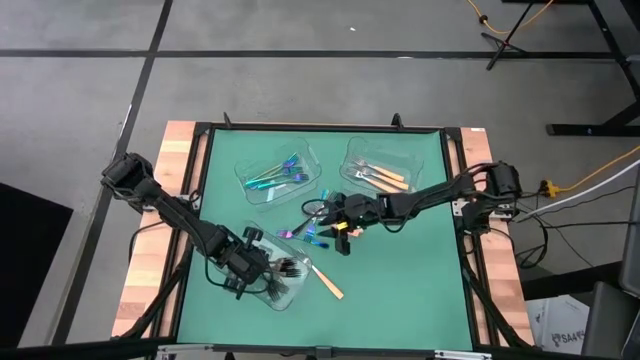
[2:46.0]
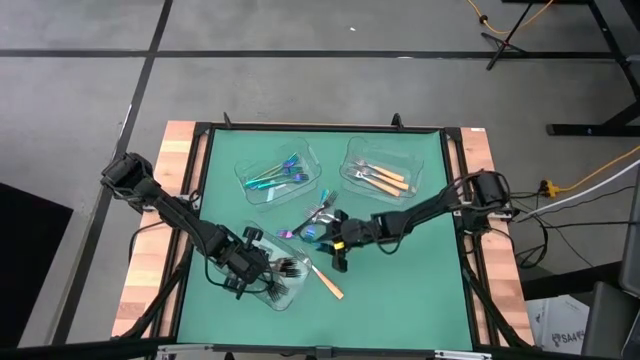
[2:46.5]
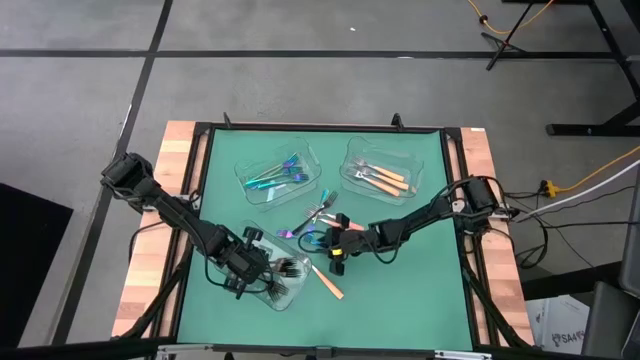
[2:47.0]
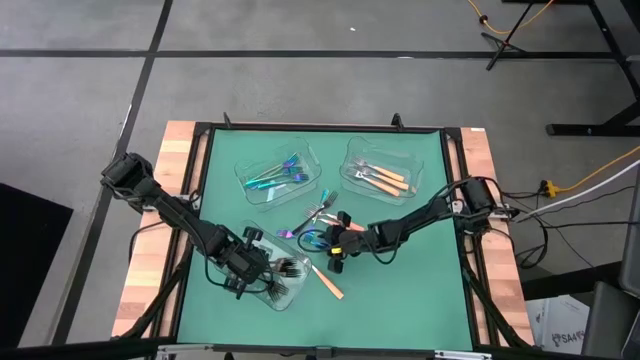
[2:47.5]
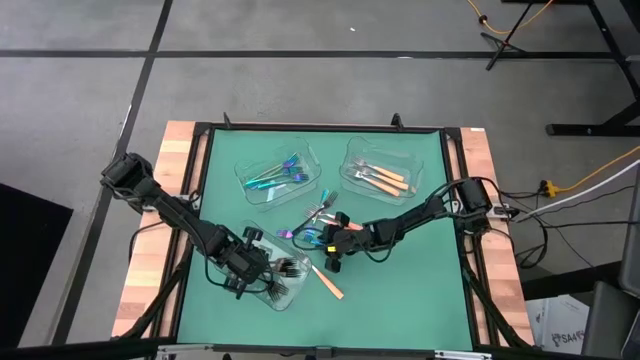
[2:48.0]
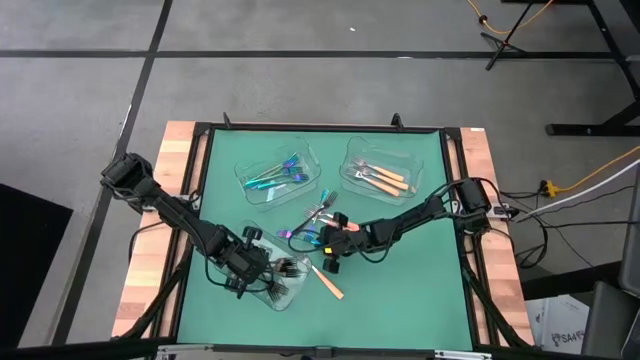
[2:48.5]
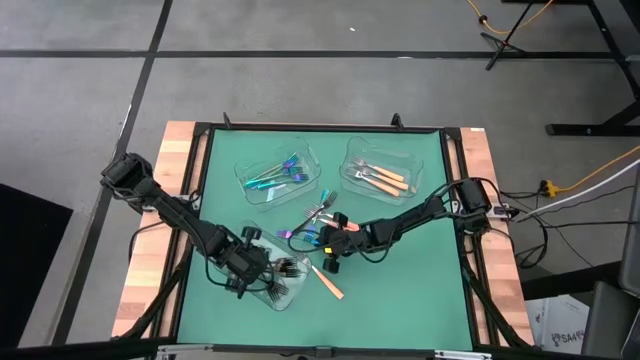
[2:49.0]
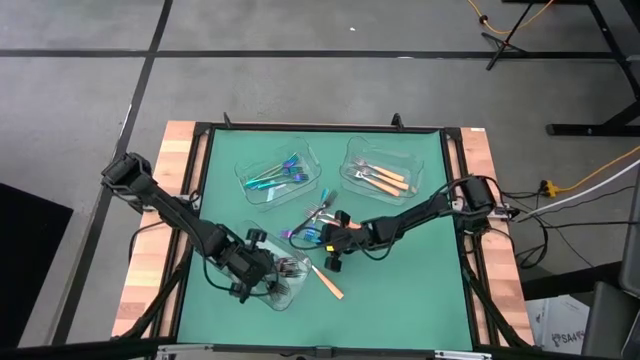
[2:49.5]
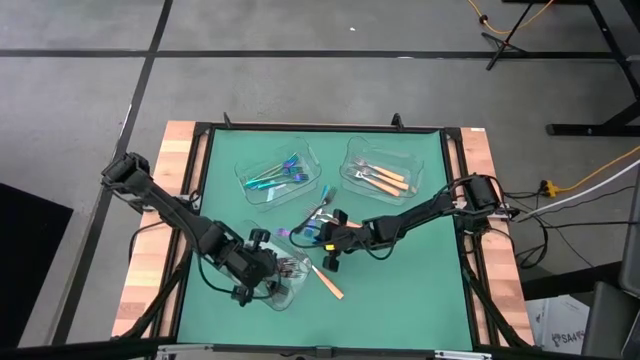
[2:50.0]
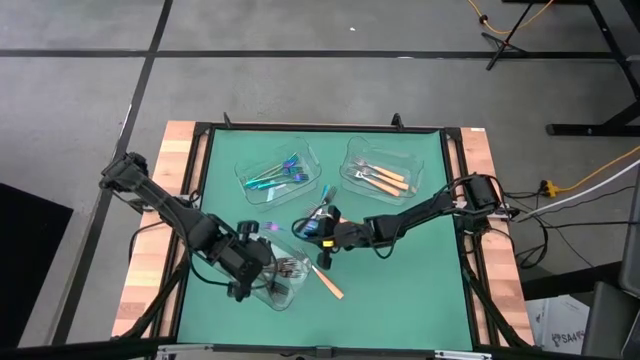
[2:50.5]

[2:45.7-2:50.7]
Task: Sort silverware by color (type)
Put the blue fork into the top left transparent bin

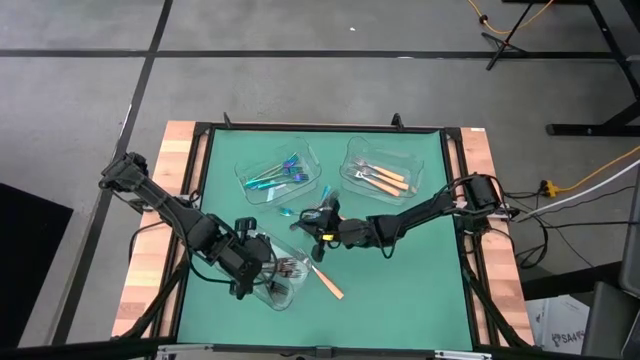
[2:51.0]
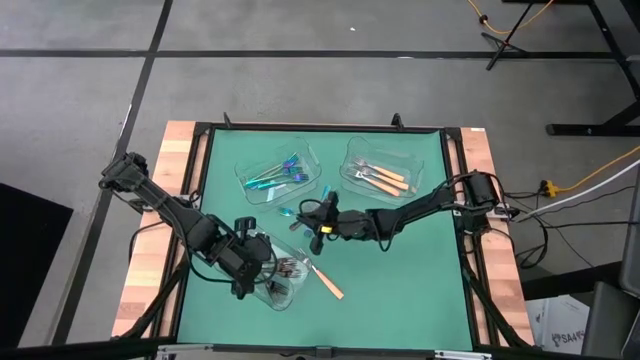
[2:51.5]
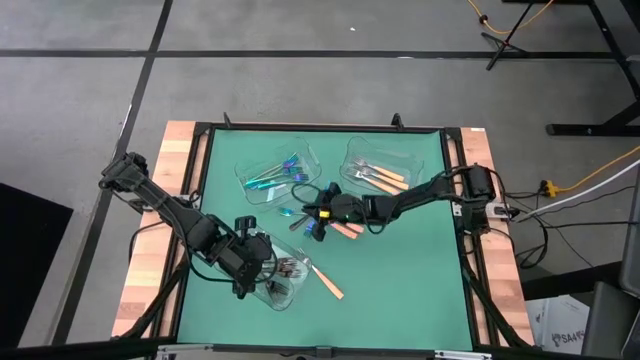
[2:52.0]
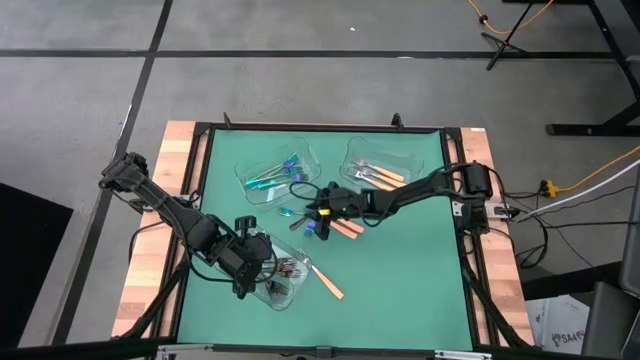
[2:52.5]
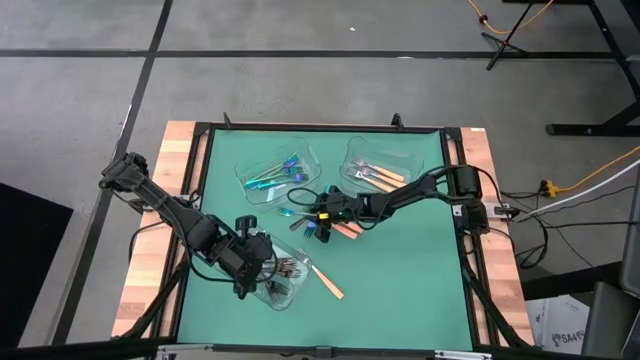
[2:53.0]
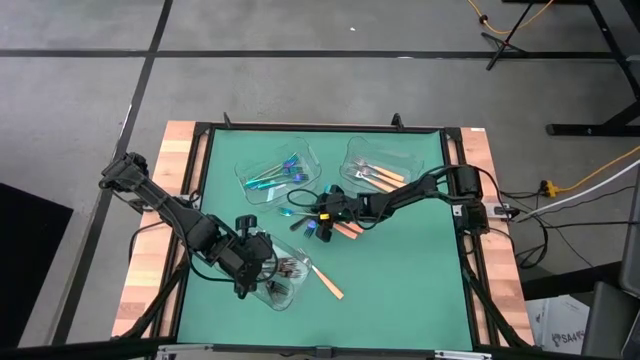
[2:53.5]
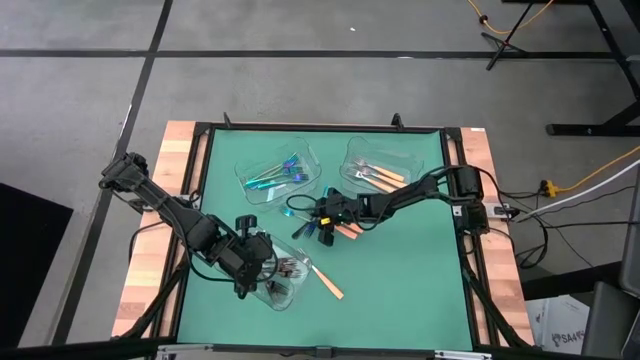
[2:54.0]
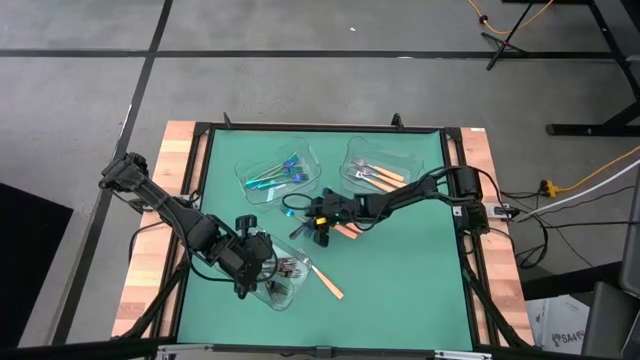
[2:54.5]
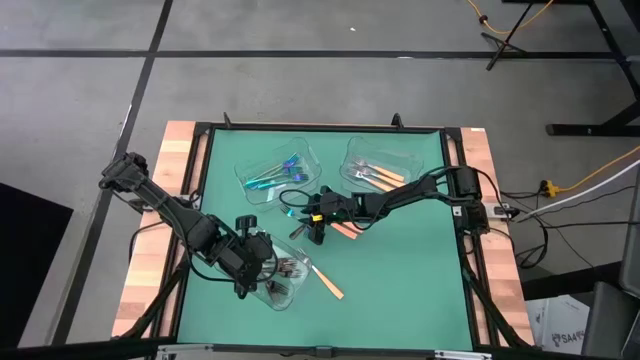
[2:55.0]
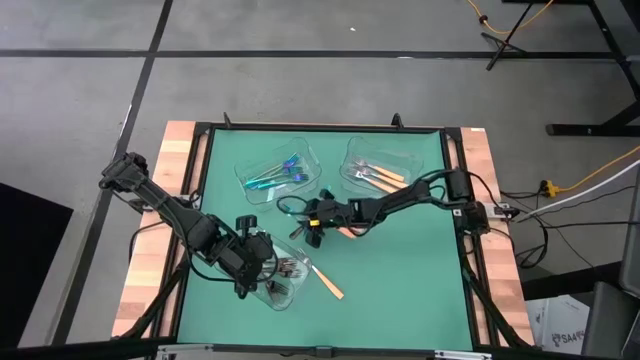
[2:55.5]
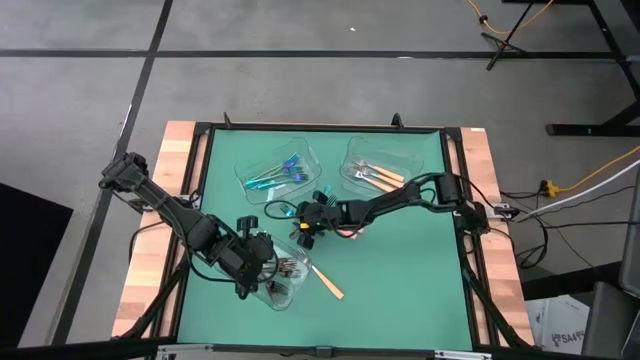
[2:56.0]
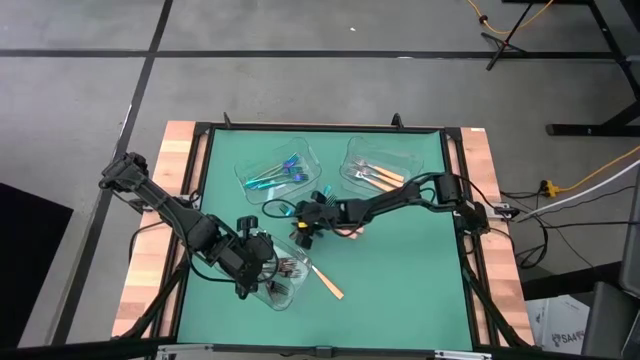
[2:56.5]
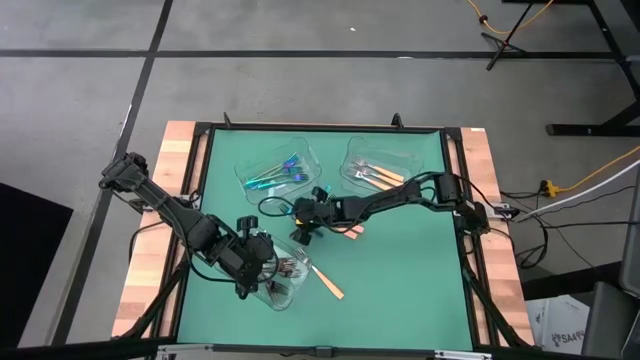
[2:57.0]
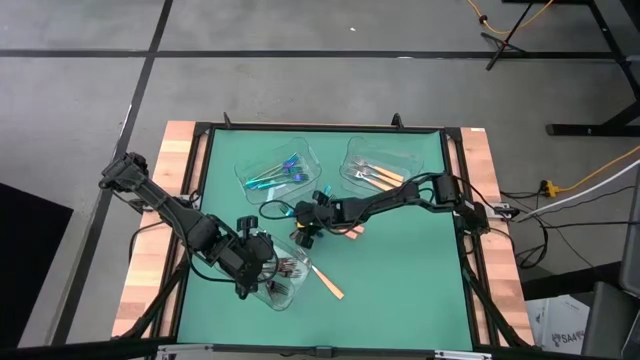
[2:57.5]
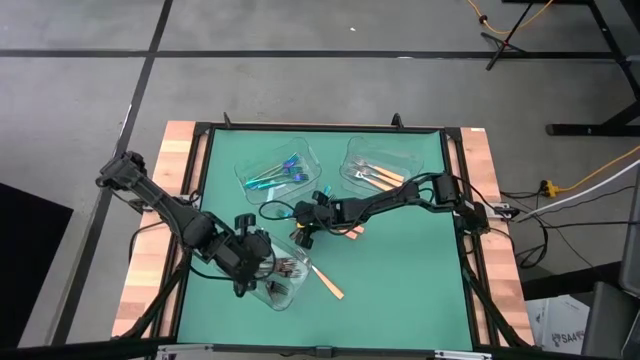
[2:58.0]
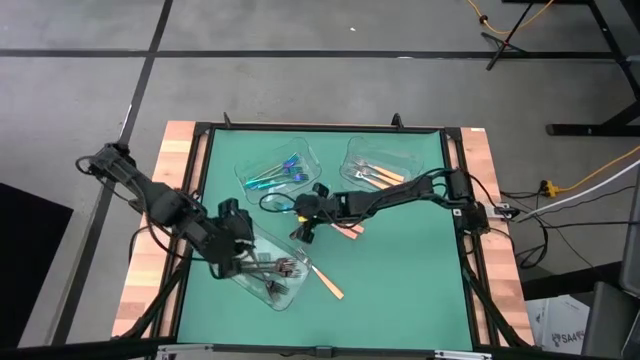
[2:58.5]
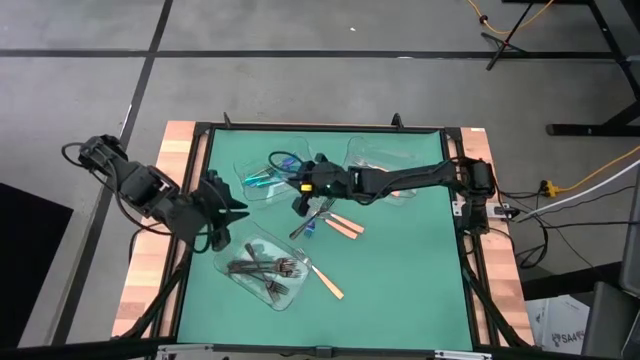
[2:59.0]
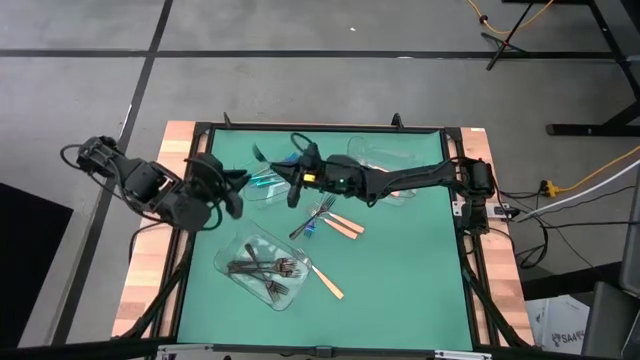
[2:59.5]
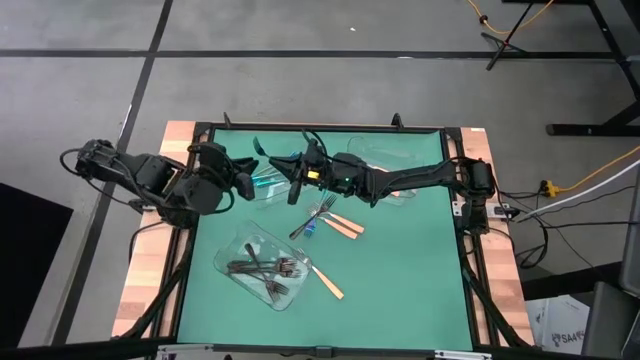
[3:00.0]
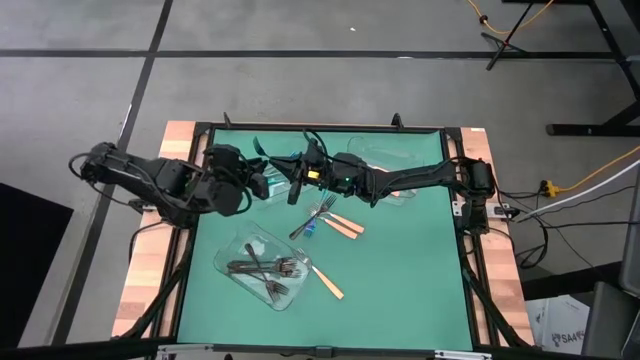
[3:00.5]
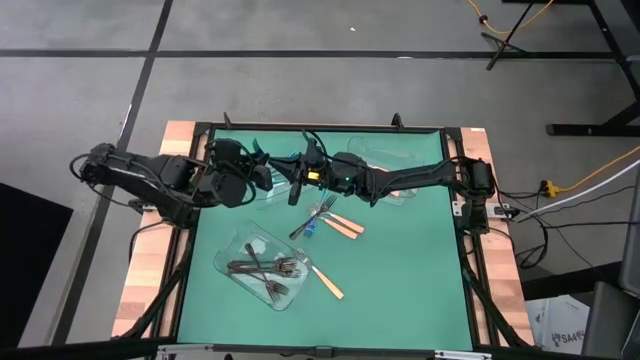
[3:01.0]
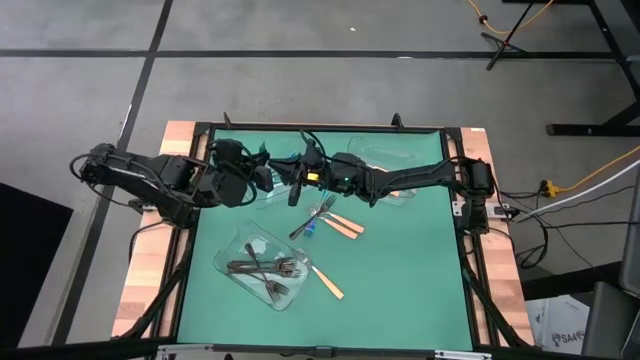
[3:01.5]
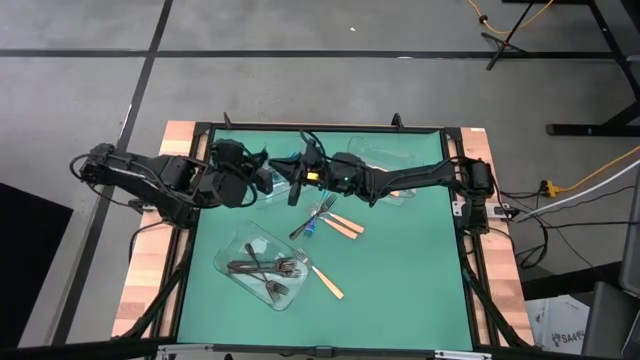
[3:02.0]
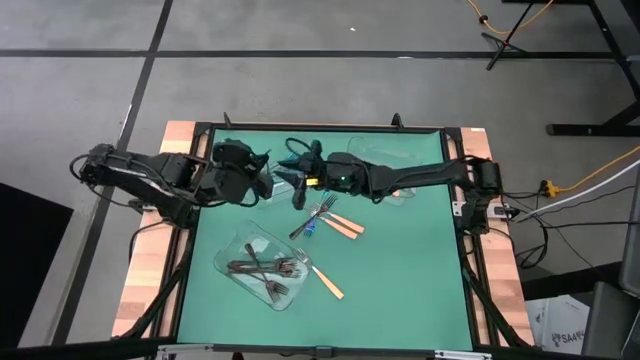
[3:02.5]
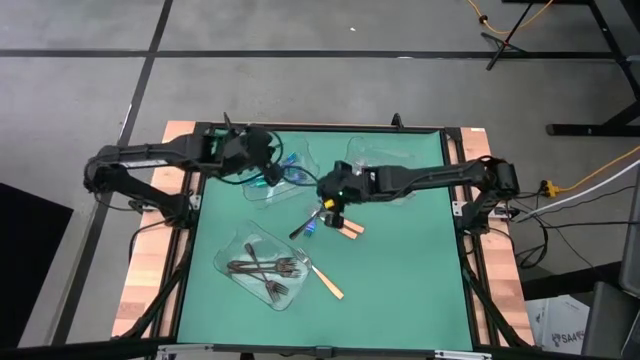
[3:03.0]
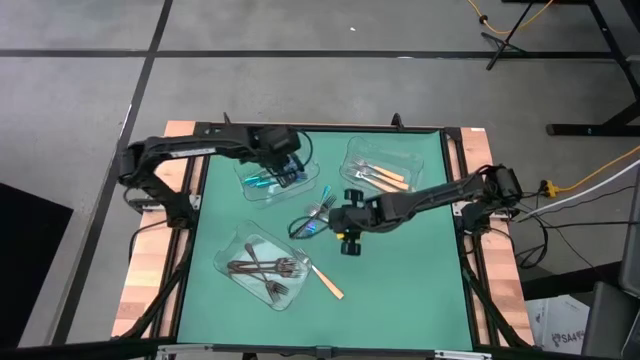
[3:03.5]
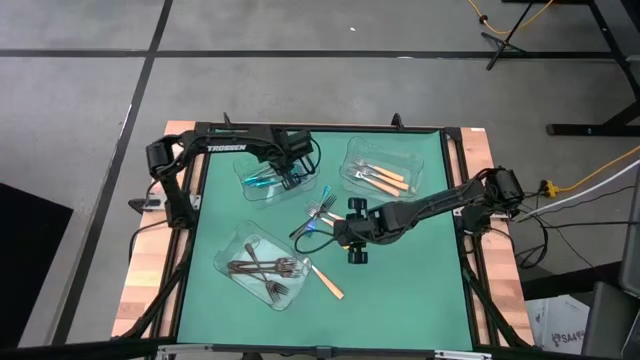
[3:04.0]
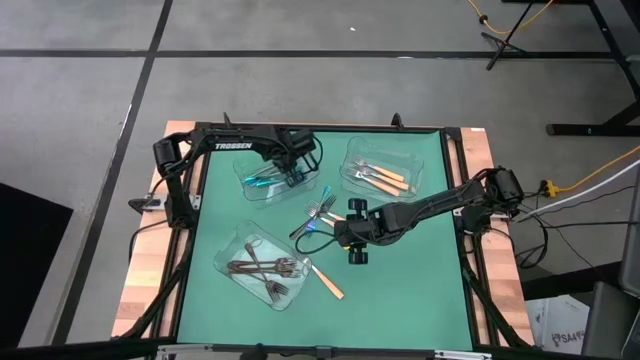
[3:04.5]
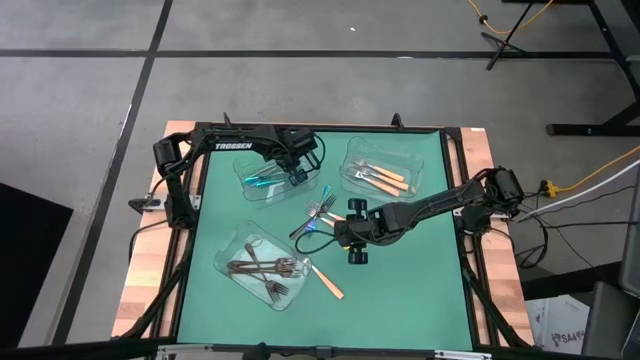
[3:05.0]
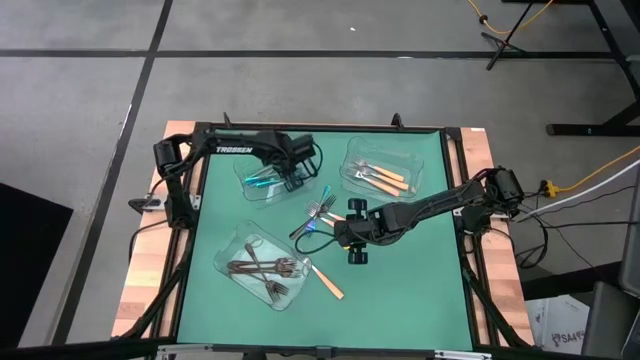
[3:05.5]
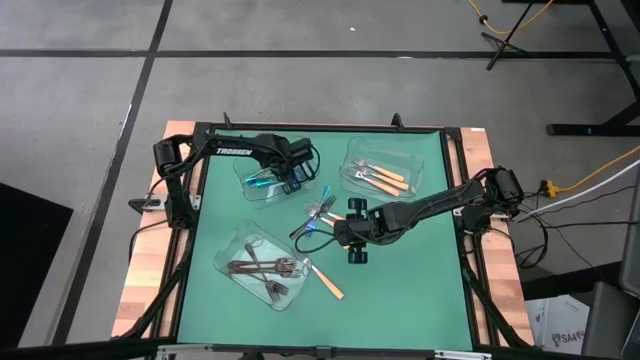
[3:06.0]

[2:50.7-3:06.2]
Put the blue fork into the top left transparent bin
